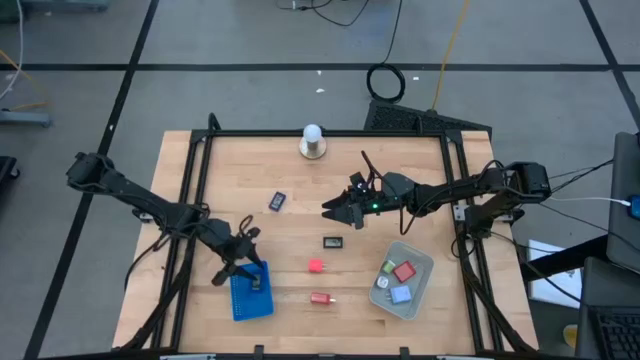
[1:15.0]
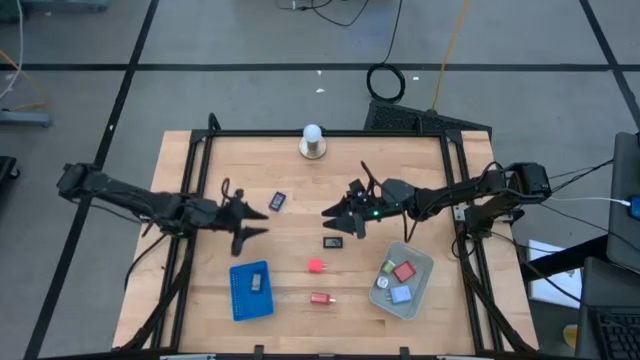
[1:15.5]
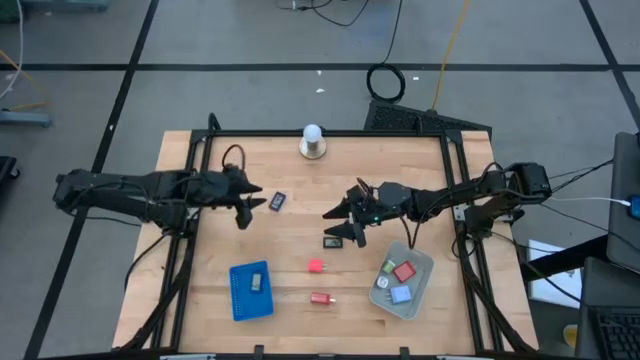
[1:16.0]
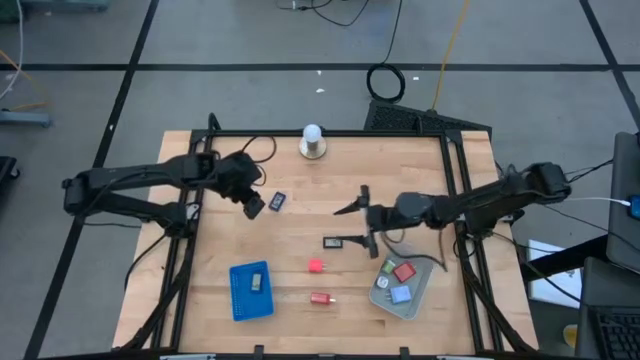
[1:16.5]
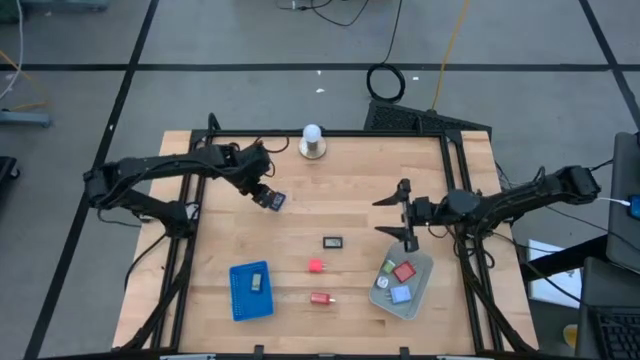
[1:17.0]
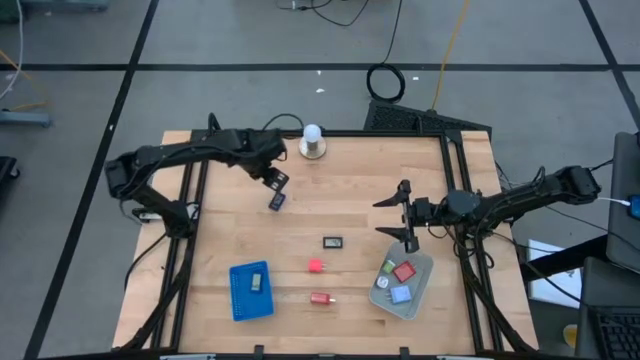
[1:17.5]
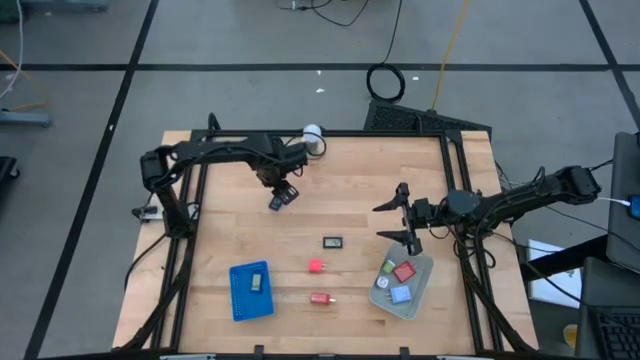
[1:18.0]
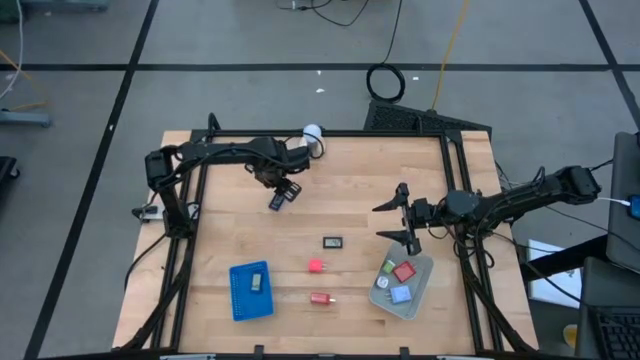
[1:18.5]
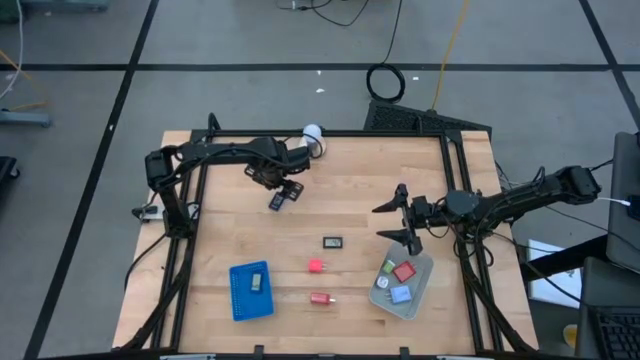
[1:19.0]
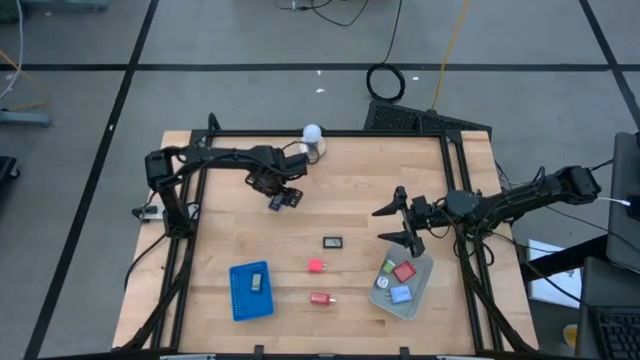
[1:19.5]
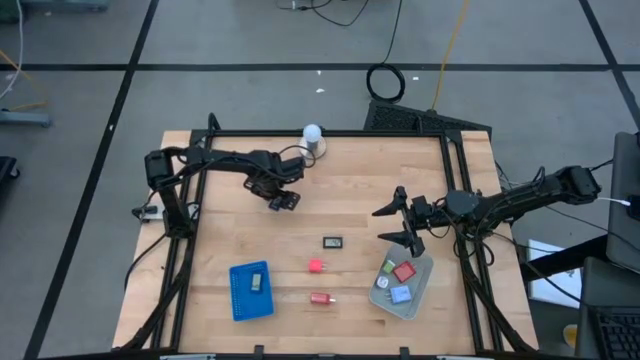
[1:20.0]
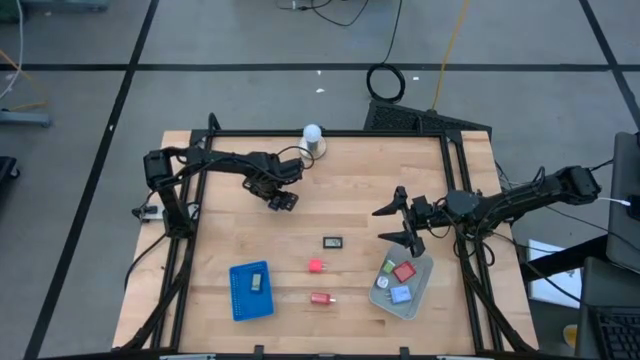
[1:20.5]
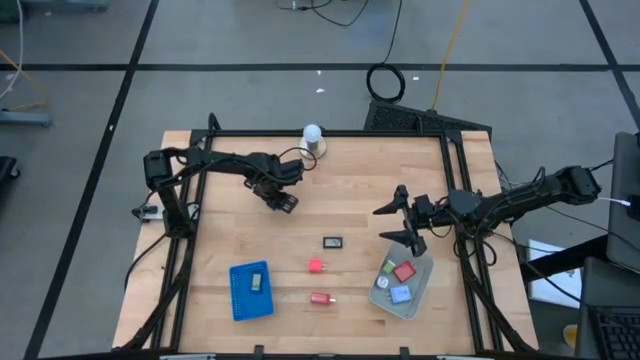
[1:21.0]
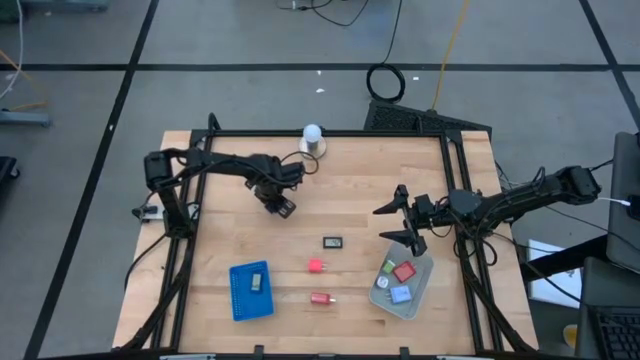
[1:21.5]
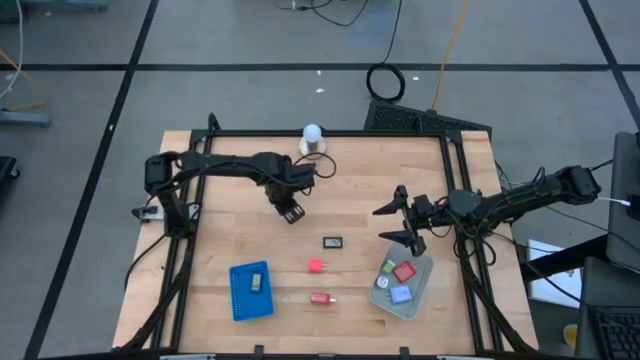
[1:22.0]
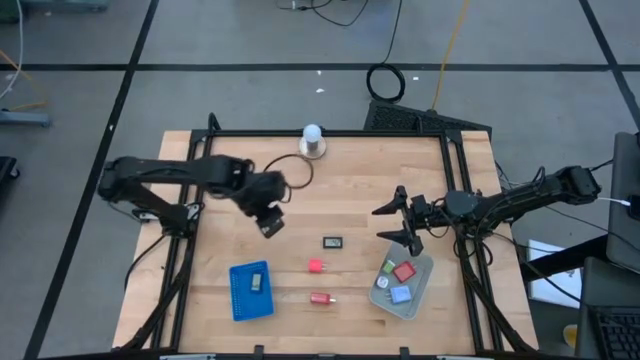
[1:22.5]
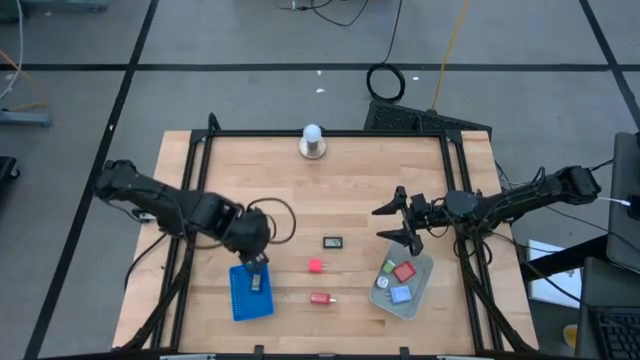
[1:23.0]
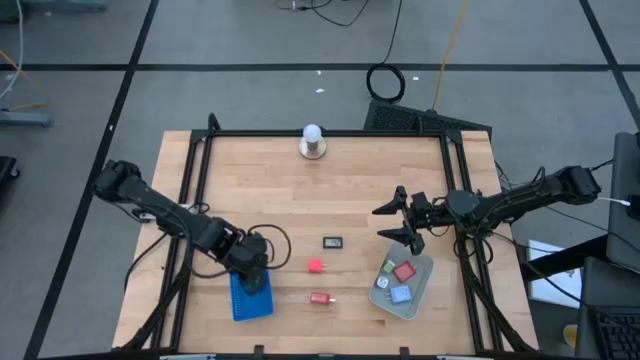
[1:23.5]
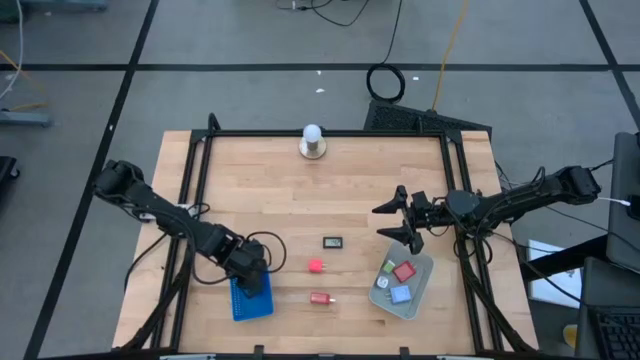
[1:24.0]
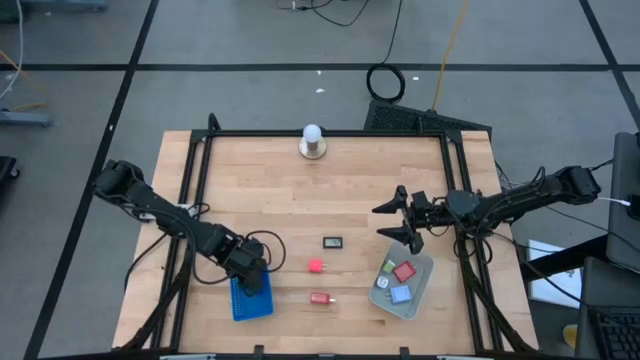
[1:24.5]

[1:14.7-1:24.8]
Task: Pick & Place Office items
Put the dark blue digital clock into the blue bin

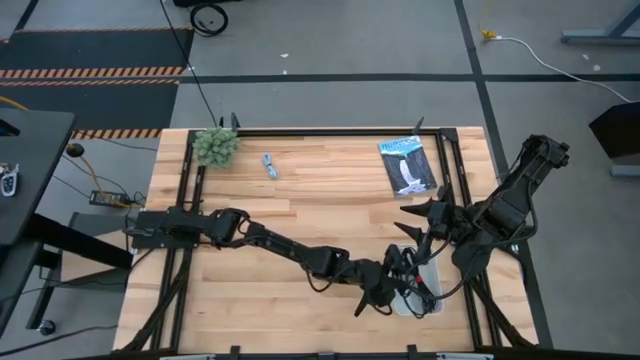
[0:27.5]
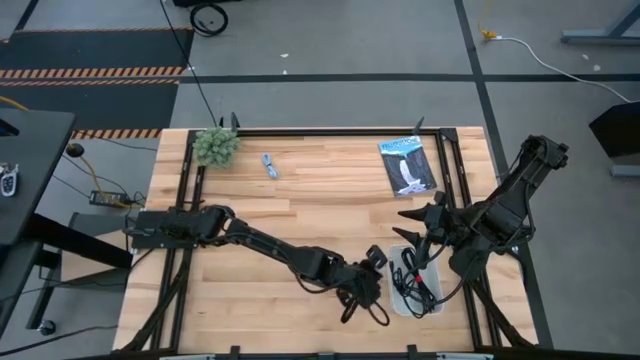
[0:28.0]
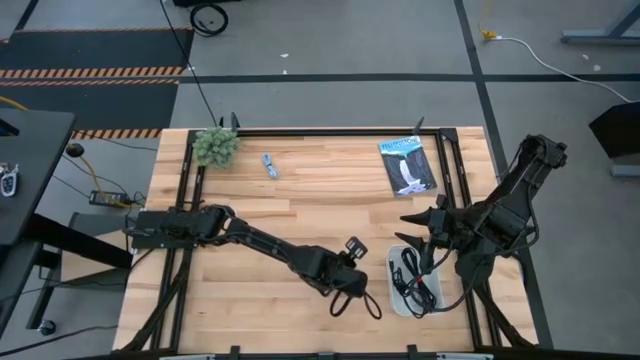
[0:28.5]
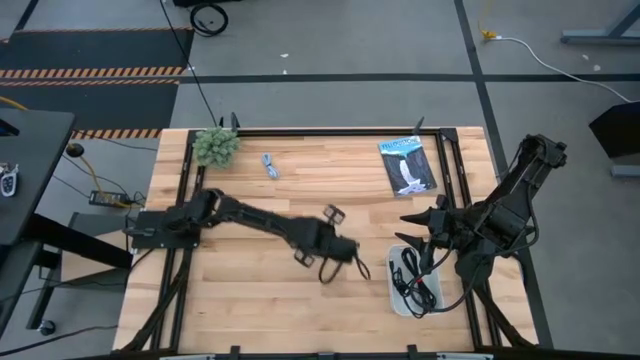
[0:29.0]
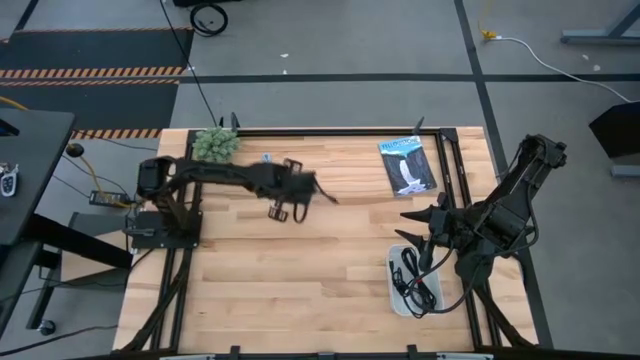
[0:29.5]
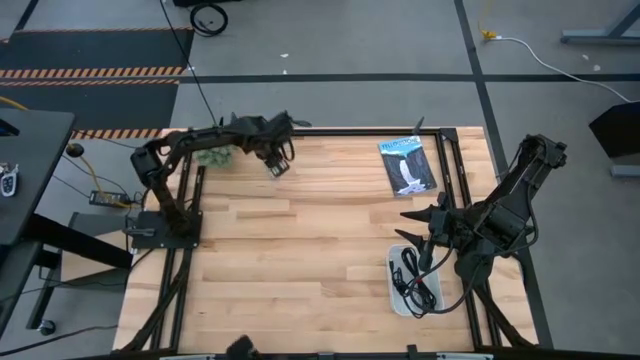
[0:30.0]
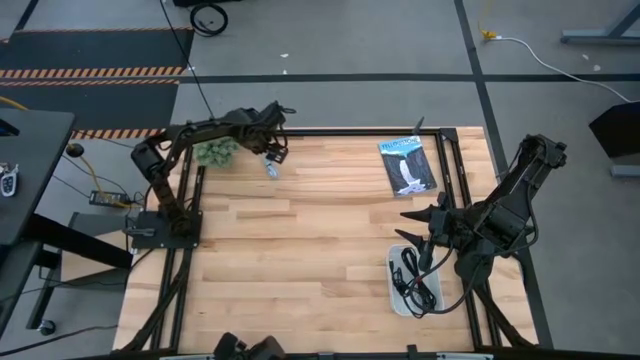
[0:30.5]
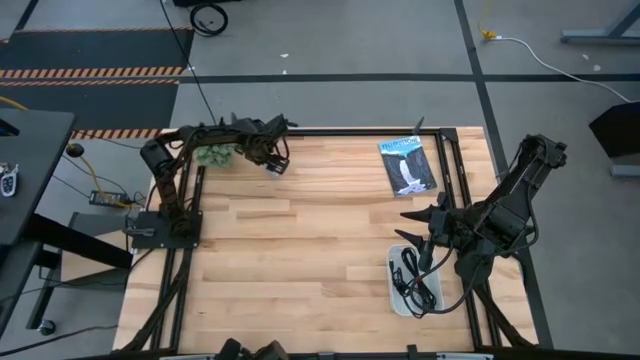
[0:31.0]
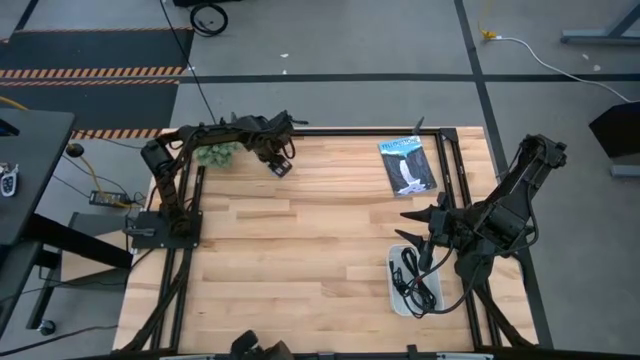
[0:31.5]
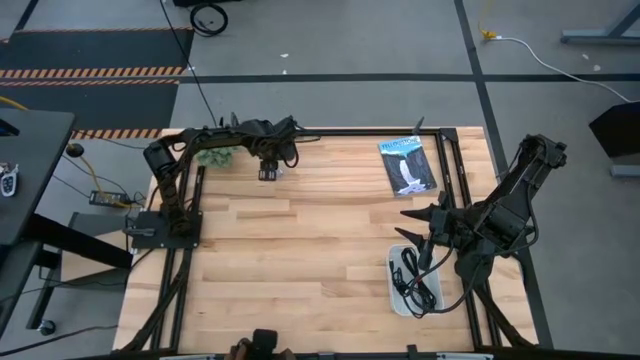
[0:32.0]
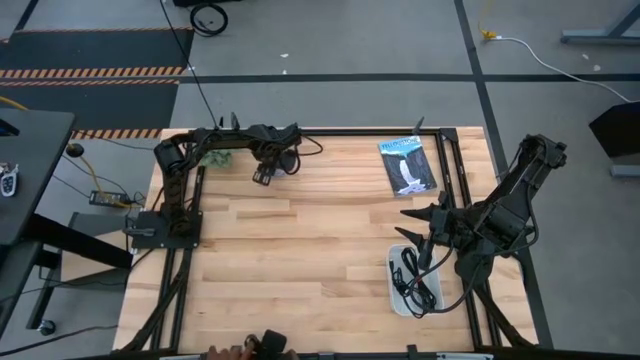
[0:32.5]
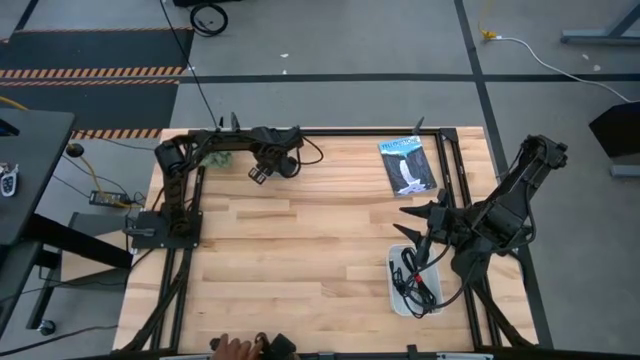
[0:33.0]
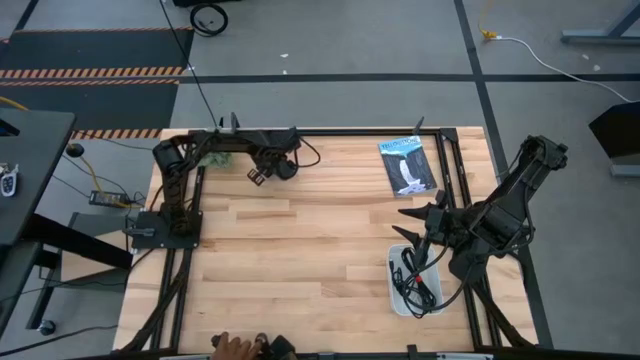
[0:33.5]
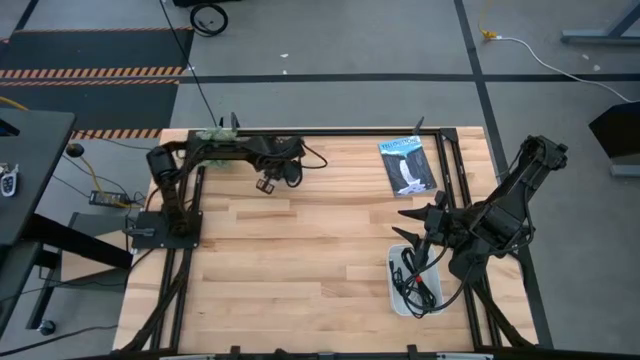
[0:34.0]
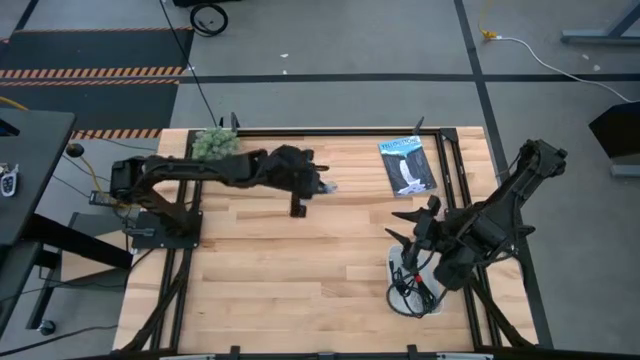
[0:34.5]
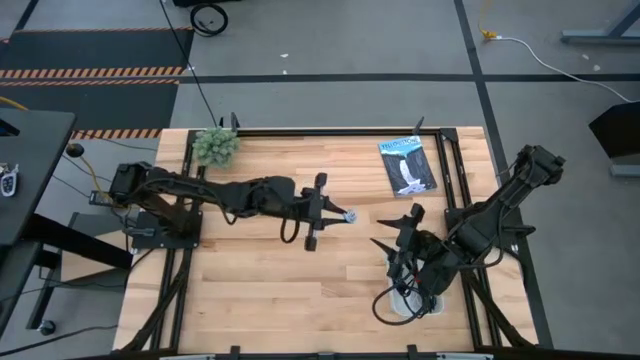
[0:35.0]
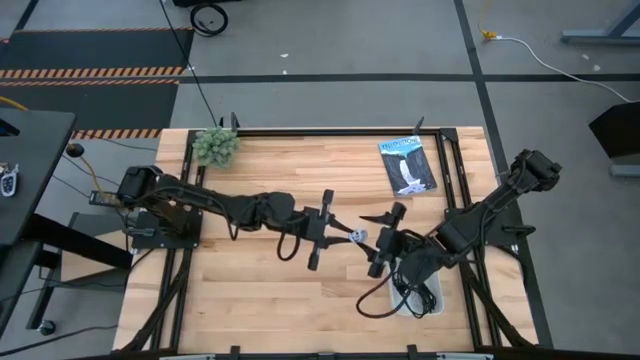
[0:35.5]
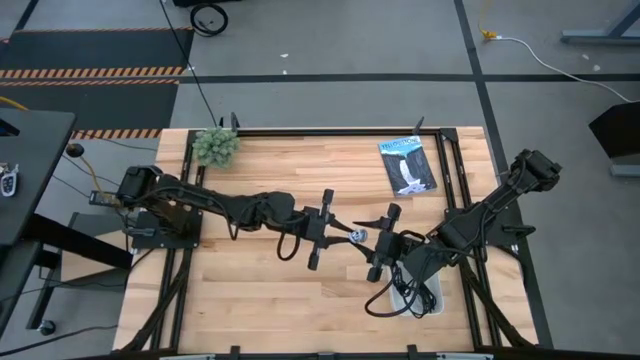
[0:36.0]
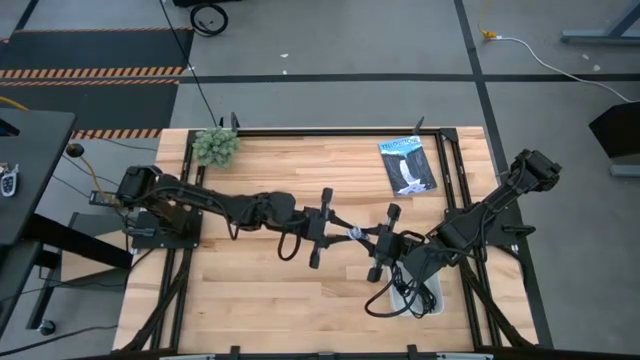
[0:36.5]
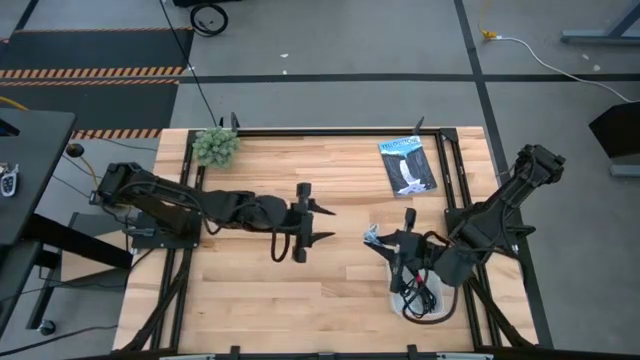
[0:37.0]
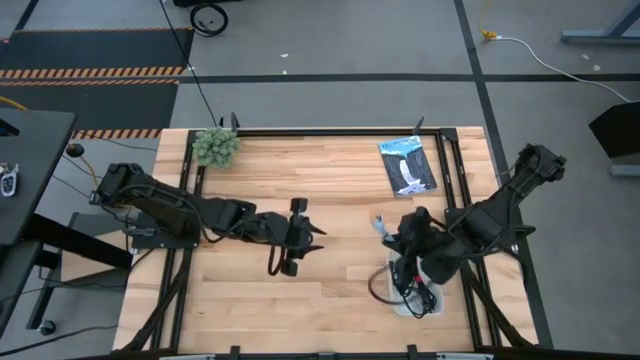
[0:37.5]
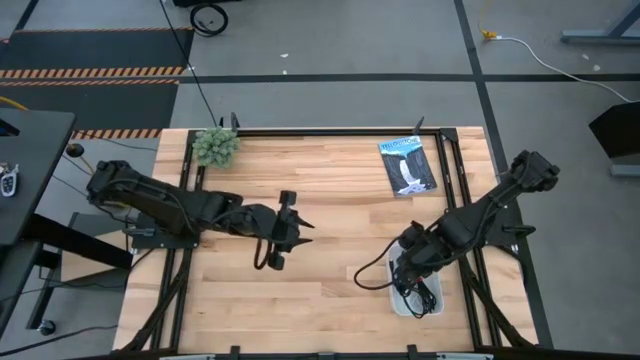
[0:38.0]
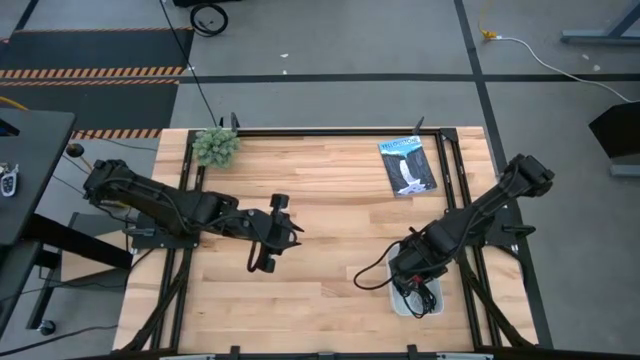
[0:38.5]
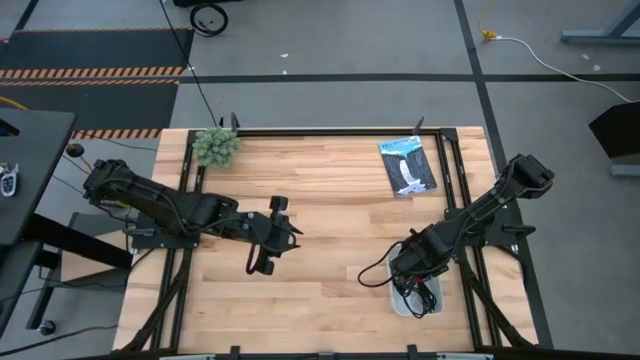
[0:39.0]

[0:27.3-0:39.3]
Task: Pick and place USB-C Cables
Put the light blue charger cable into the white bin
